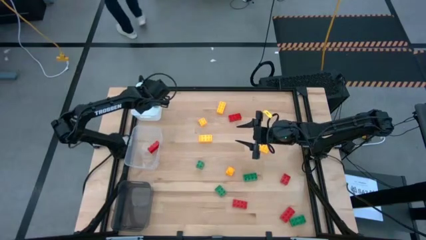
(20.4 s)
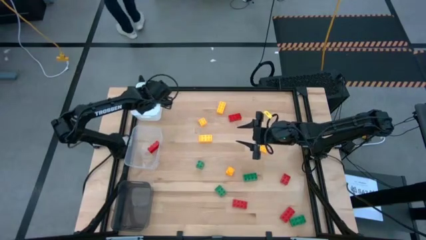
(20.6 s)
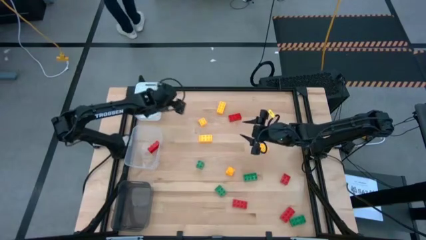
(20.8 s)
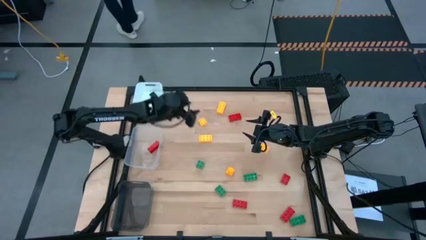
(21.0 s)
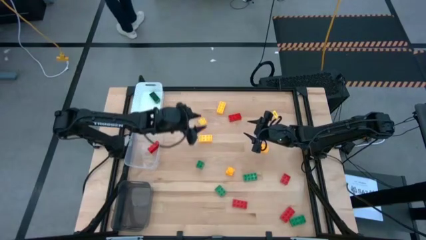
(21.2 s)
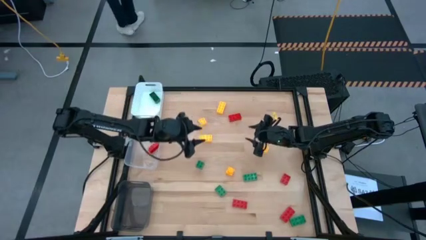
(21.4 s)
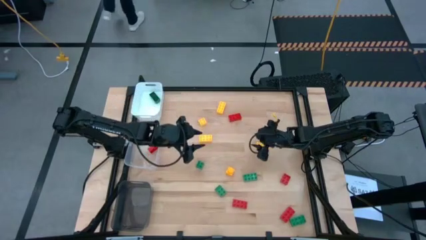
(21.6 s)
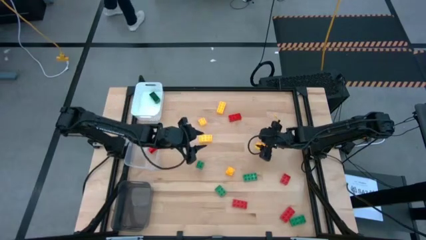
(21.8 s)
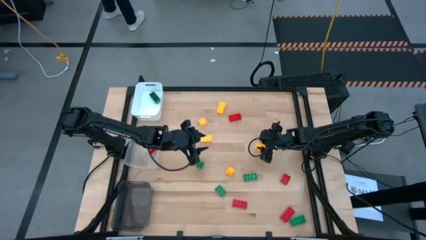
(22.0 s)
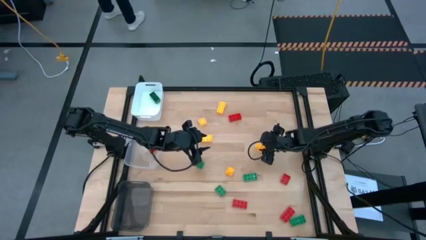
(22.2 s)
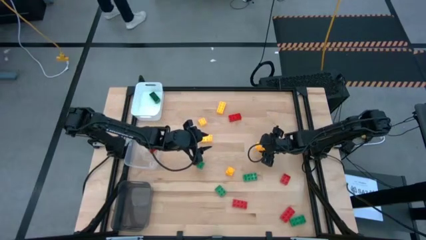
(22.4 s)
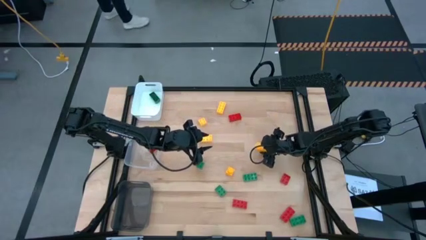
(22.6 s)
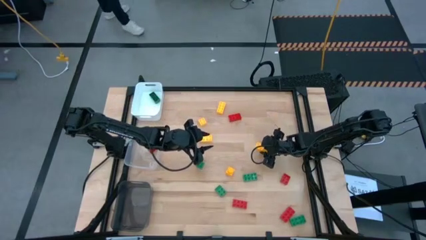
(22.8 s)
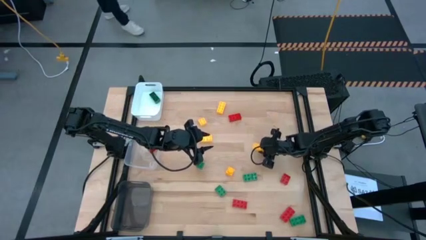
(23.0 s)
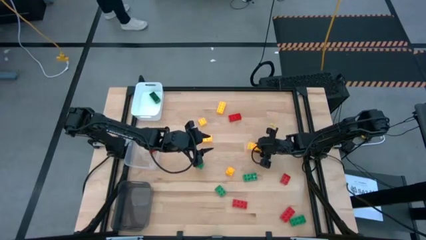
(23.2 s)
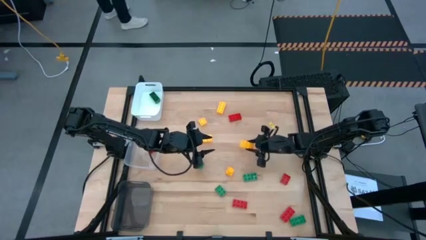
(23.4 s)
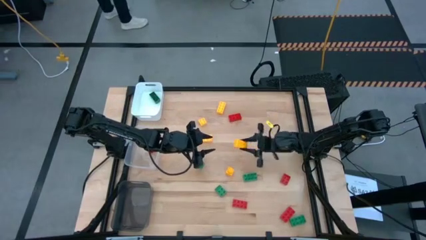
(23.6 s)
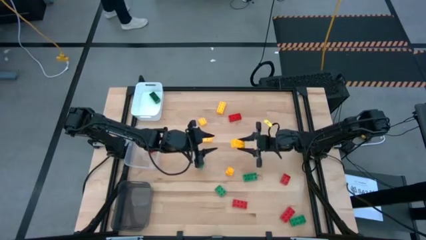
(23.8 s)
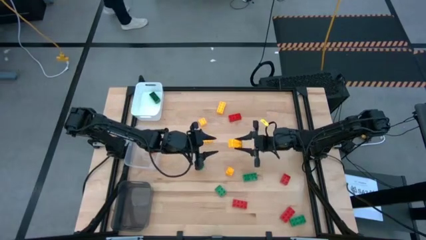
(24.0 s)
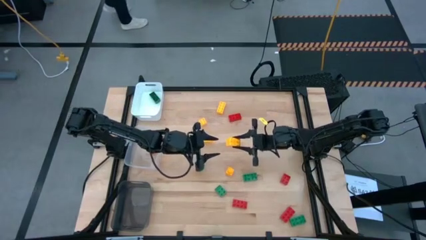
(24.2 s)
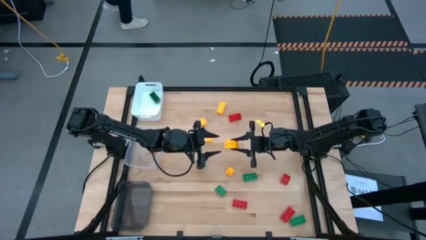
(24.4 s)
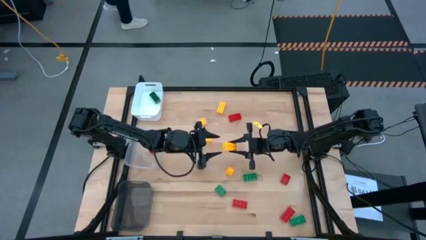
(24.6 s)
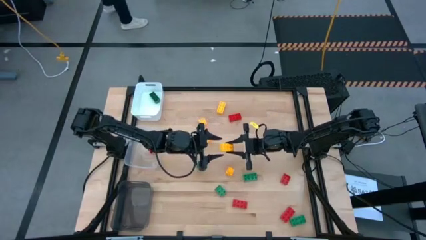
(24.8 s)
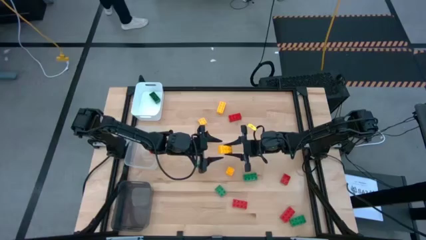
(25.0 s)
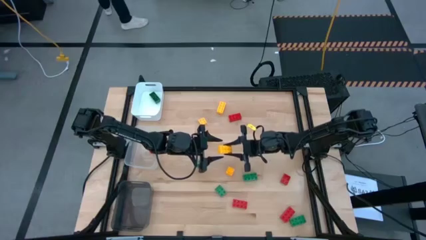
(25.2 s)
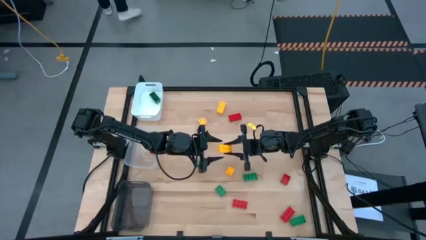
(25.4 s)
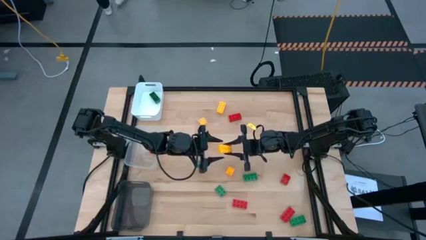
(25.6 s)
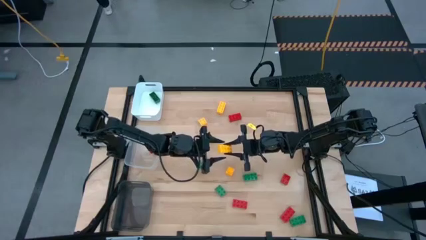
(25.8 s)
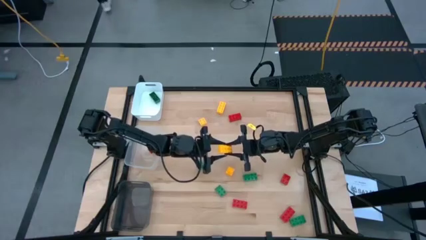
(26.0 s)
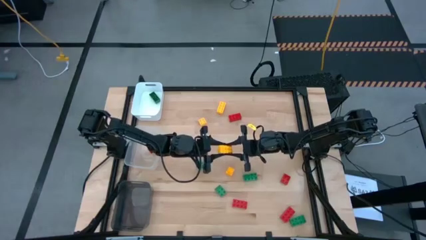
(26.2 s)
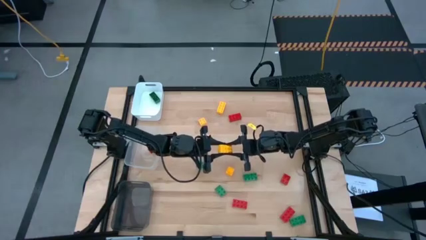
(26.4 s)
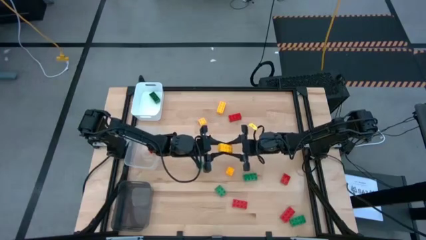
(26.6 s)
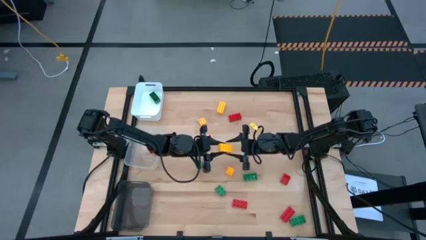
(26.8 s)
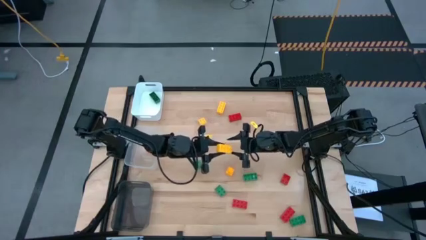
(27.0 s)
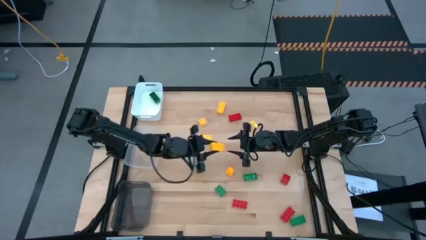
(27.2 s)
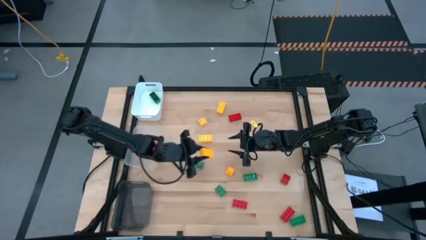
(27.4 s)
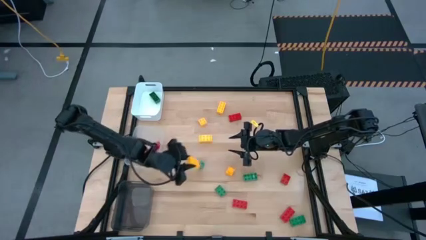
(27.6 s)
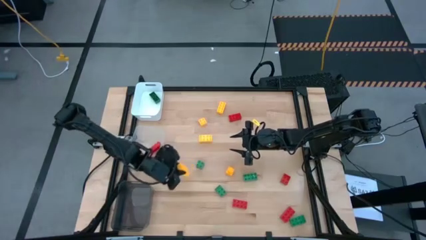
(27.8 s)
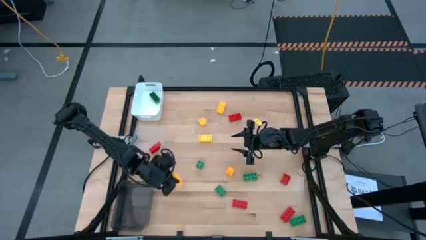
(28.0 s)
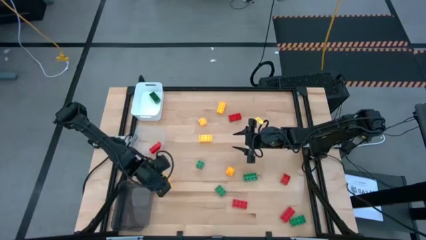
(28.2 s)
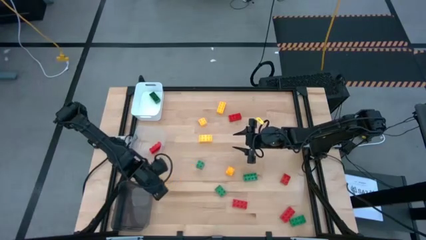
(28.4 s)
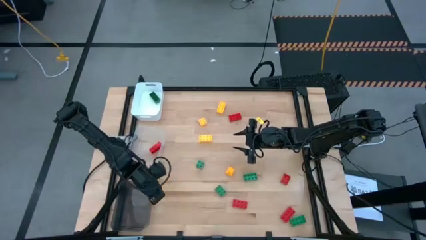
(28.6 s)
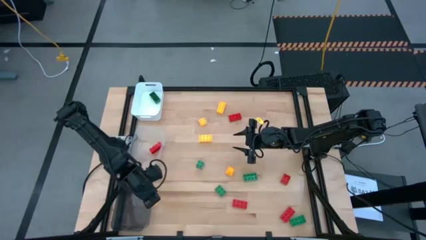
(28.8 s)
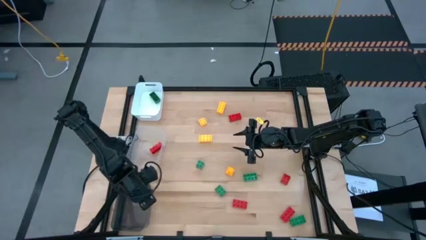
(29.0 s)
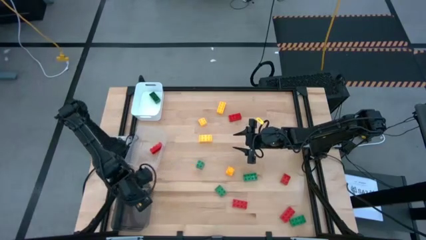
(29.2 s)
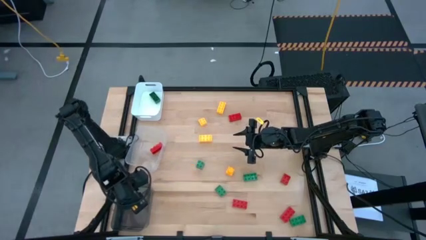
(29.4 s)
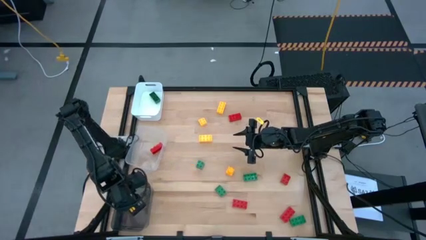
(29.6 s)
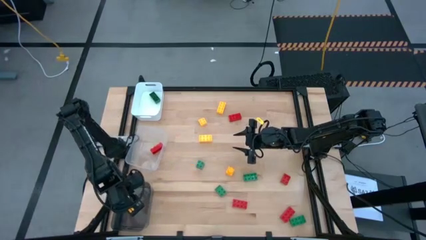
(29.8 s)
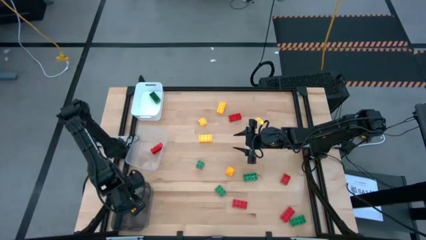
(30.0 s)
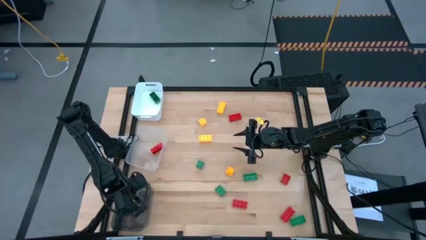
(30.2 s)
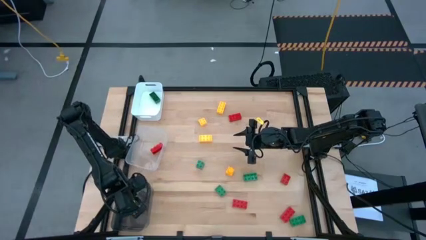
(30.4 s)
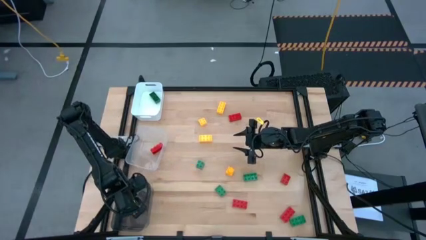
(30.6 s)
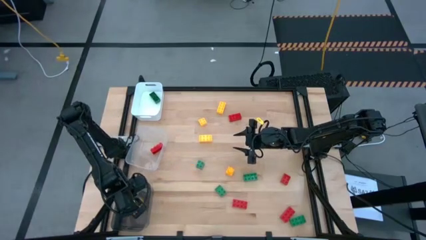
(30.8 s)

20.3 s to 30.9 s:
Task: Sort & place blocks by color
Put the yellow game piece into the black bin

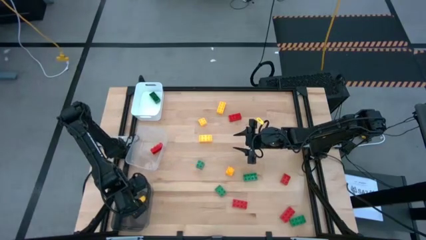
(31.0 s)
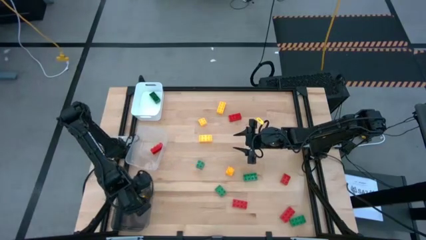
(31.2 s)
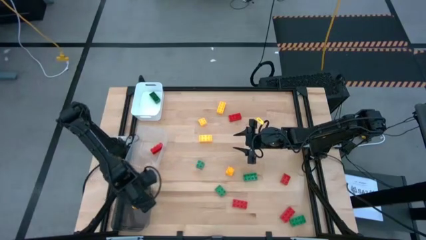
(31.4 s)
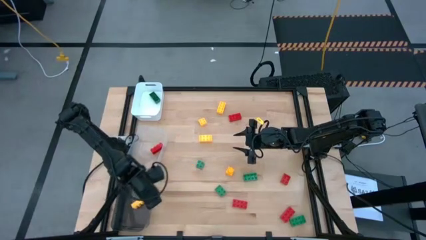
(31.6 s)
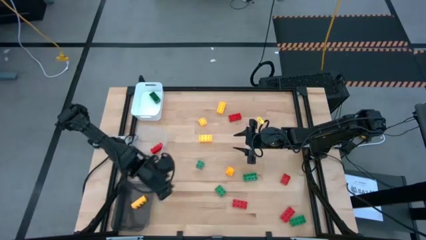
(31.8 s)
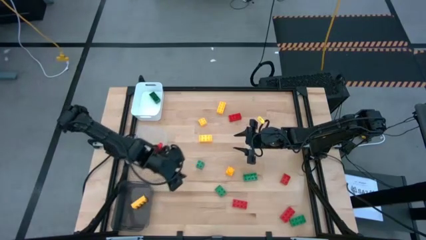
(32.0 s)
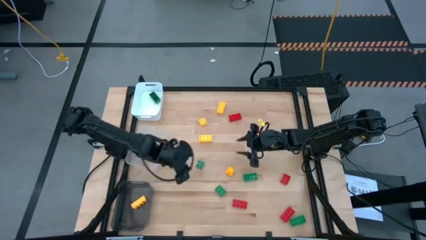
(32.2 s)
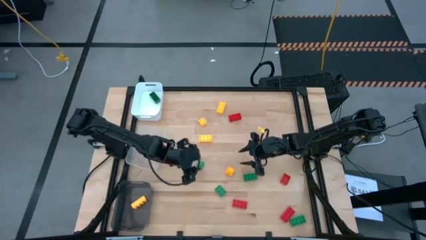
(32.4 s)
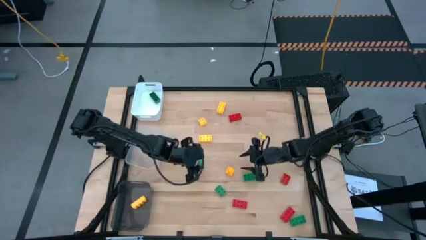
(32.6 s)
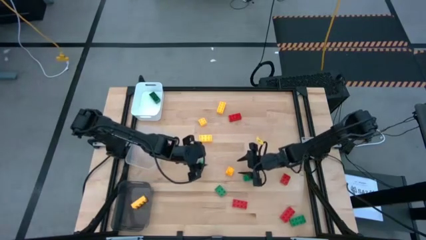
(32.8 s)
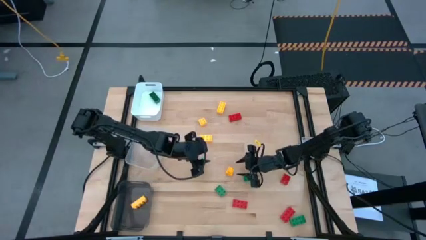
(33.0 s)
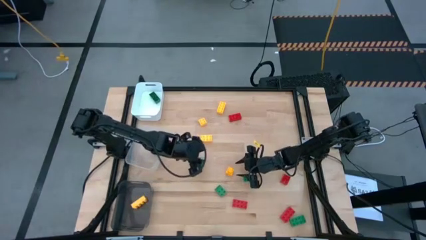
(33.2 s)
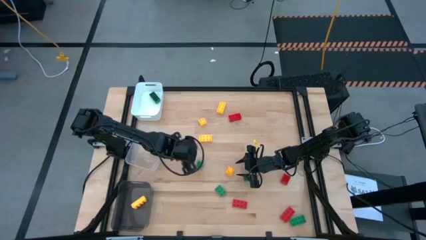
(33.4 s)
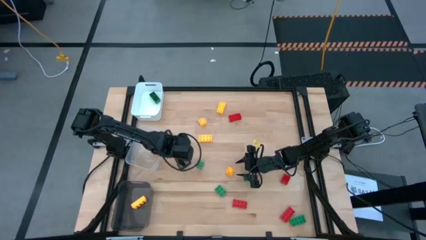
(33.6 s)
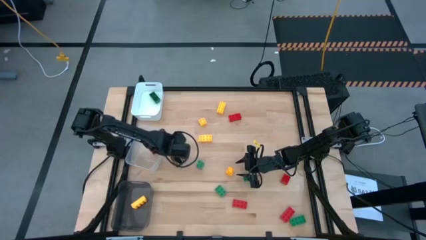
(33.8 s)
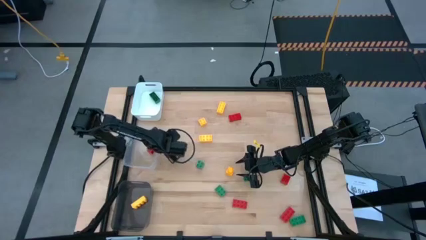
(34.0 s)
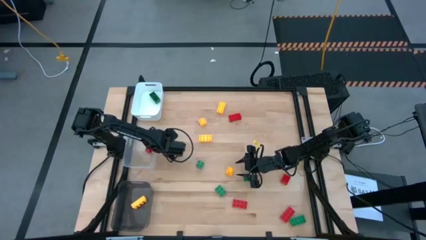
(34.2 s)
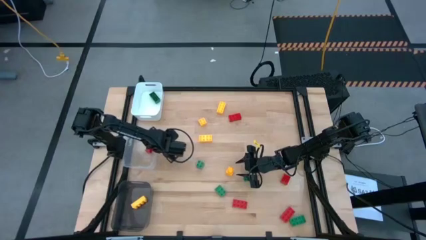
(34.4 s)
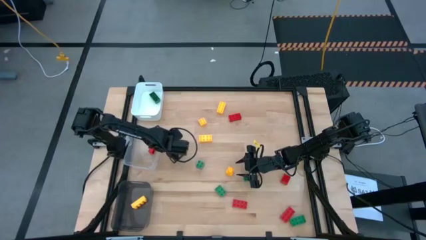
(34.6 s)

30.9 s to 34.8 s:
Adjust the transparent bin

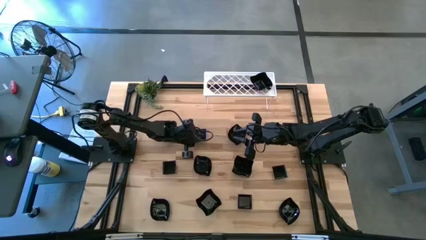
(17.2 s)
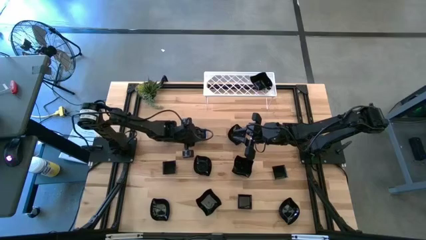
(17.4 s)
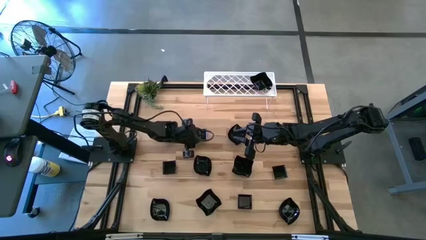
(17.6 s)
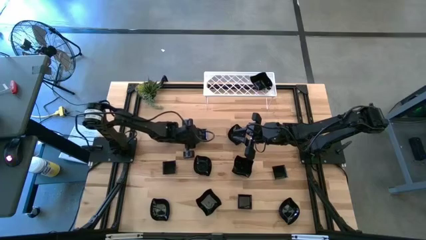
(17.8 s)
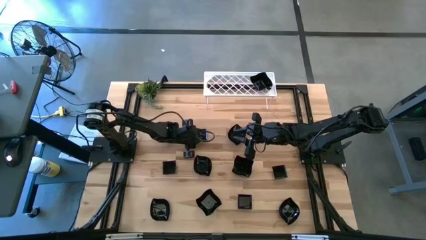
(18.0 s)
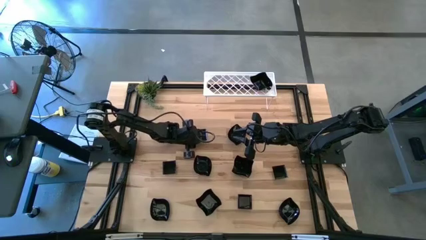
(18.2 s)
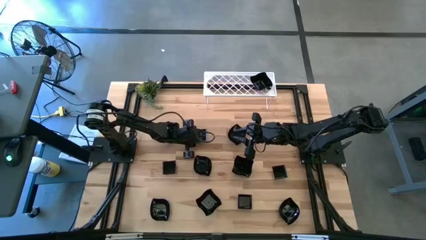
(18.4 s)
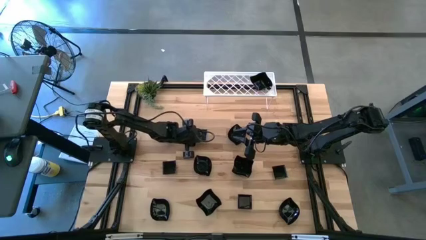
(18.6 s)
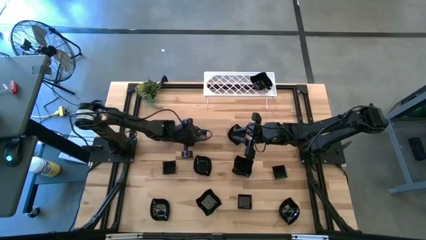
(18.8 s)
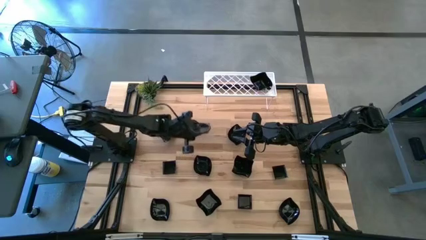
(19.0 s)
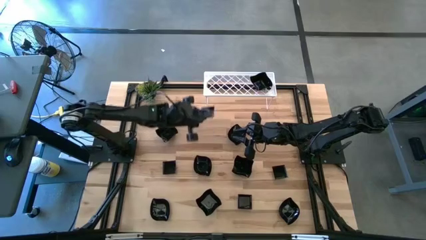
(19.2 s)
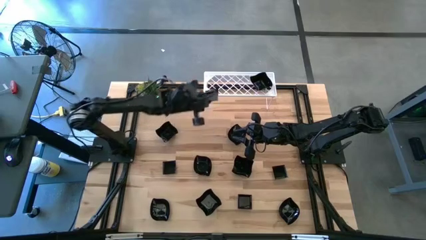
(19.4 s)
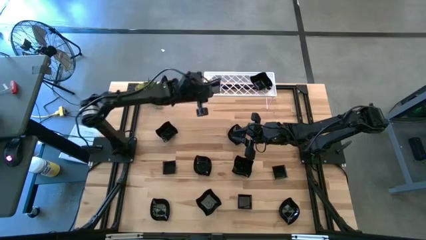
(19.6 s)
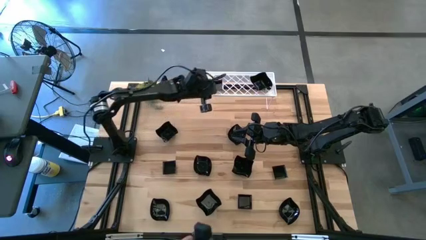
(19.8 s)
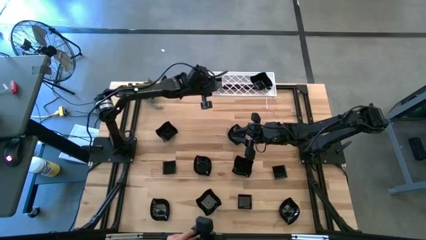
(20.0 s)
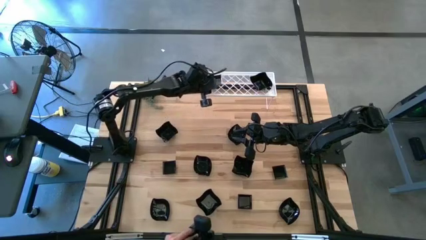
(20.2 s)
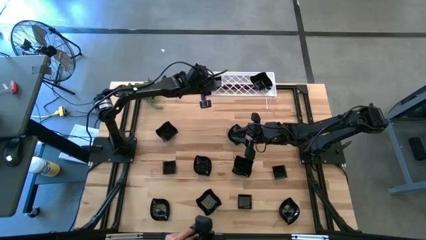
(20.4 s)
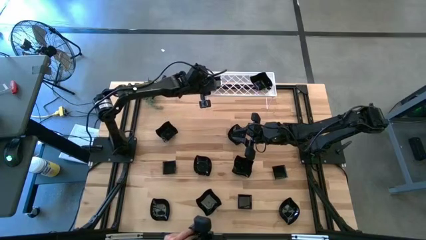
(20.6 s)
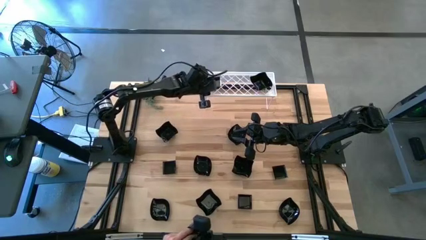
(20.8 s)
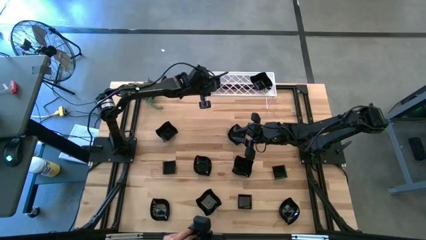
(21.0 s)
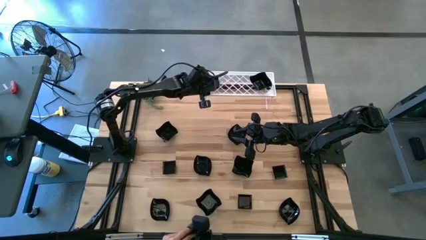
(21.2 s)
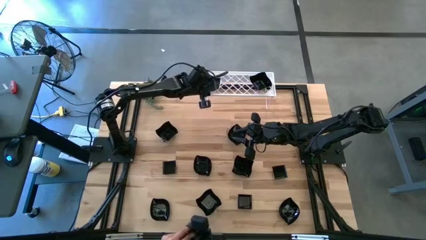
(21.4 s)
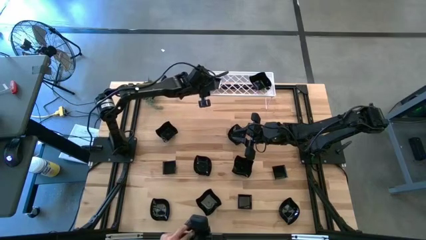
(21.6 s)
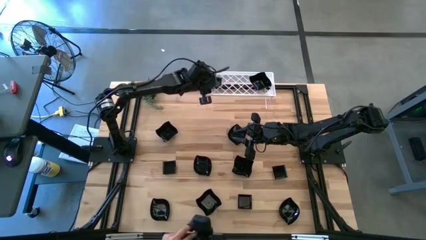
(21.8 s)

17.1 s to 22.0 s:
Task: Pick & Place Mini shaped plates
Put the square plate on the shelf
